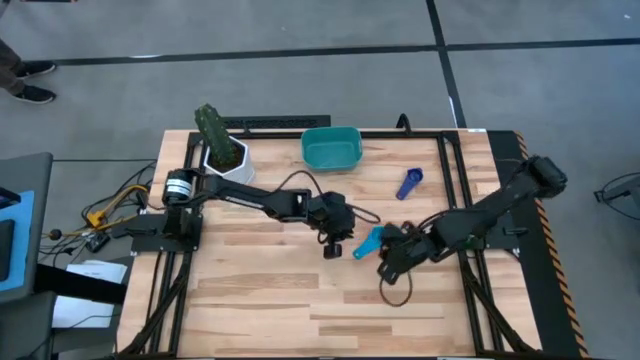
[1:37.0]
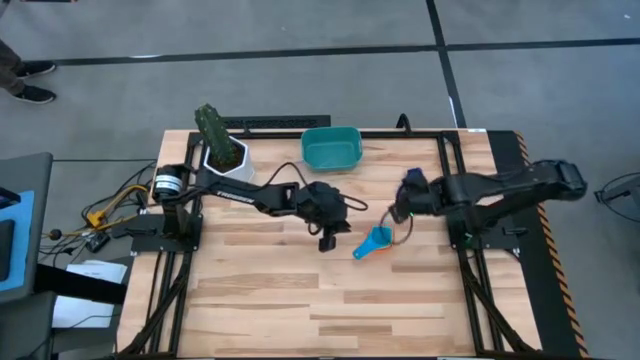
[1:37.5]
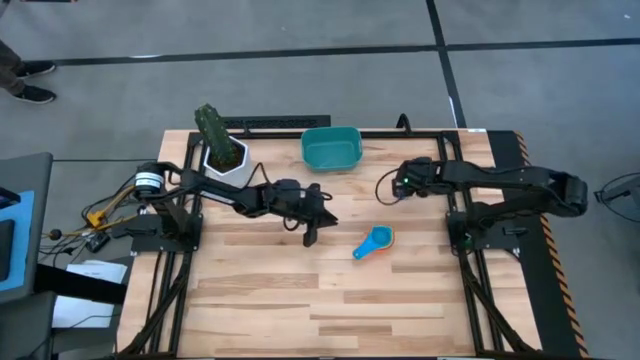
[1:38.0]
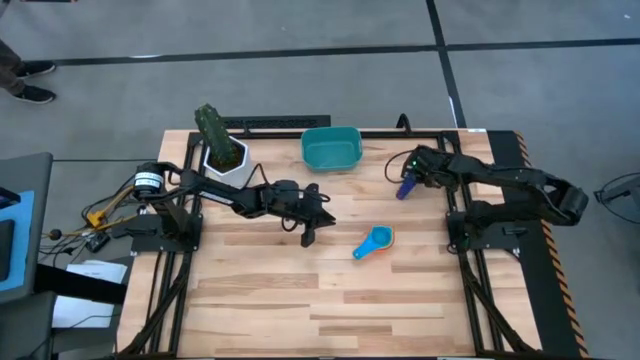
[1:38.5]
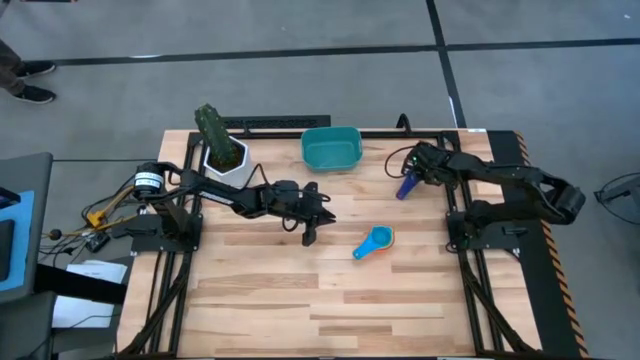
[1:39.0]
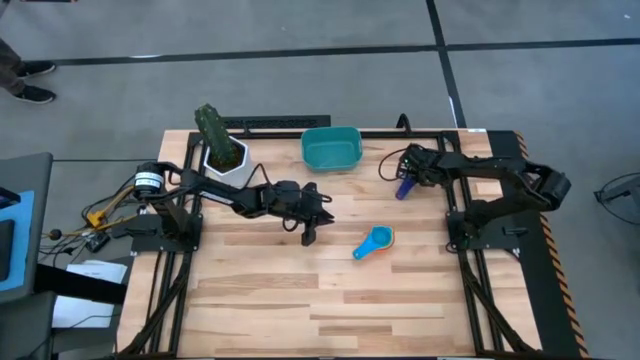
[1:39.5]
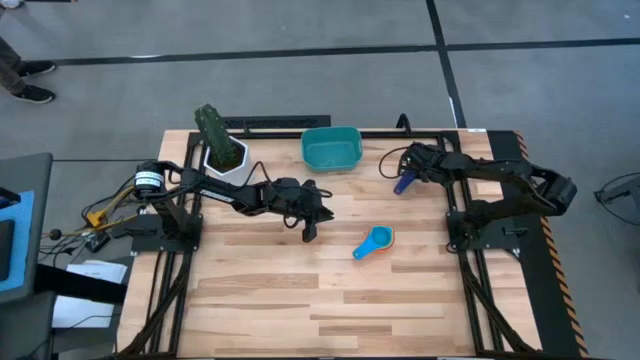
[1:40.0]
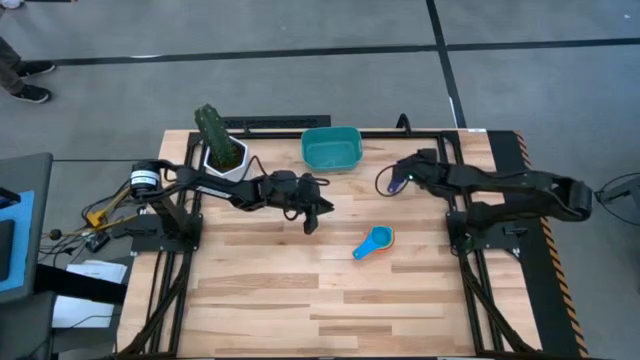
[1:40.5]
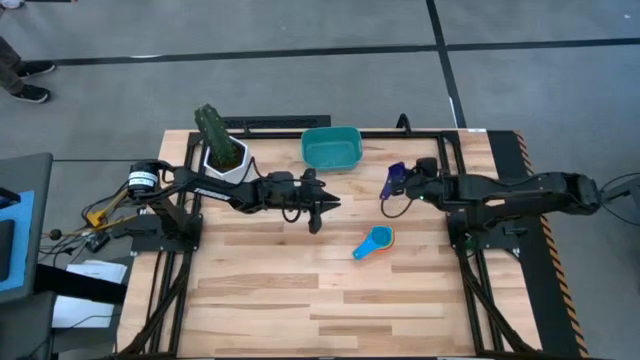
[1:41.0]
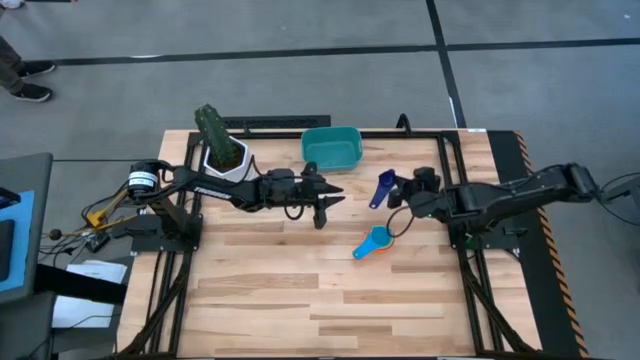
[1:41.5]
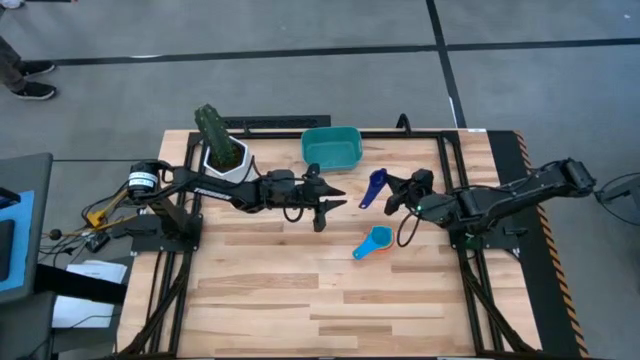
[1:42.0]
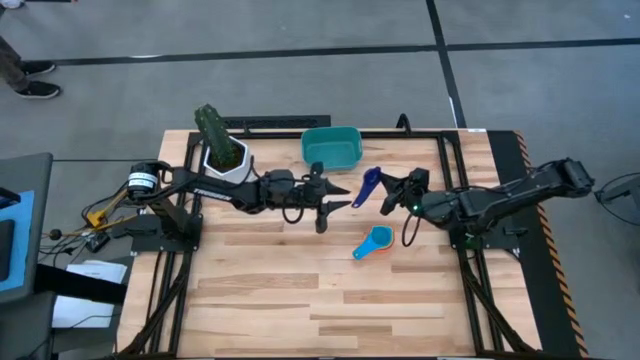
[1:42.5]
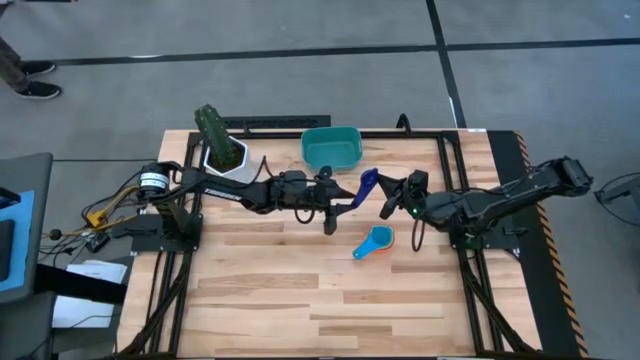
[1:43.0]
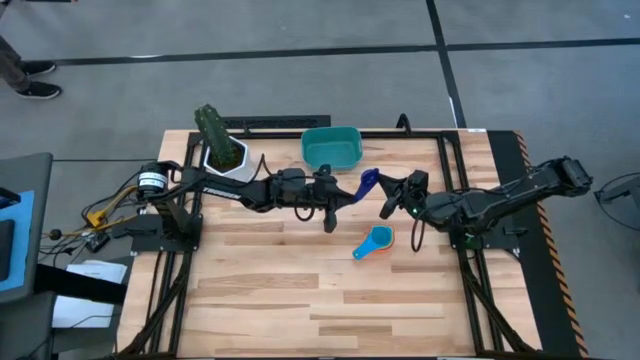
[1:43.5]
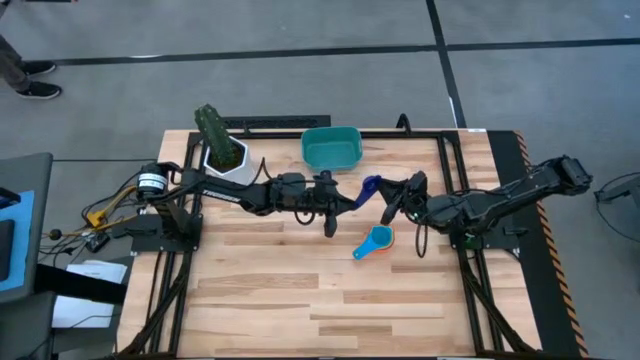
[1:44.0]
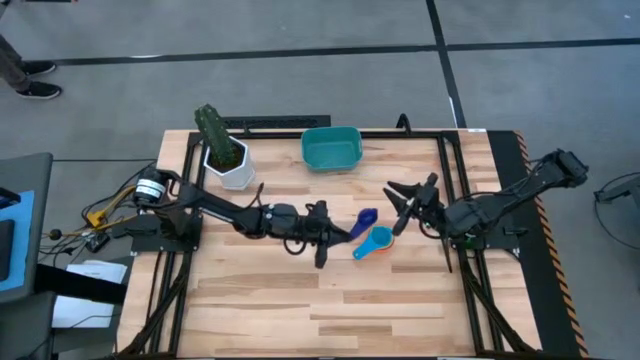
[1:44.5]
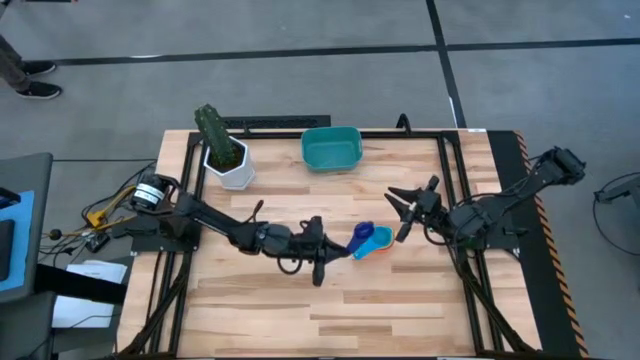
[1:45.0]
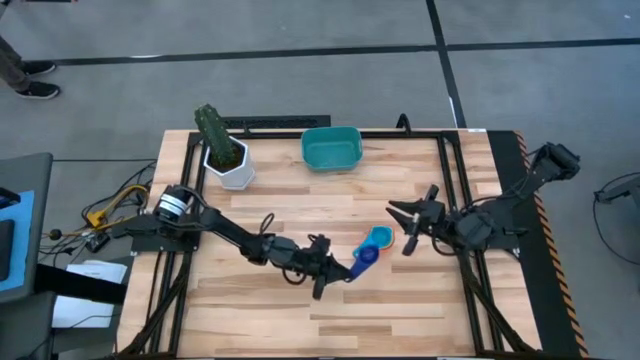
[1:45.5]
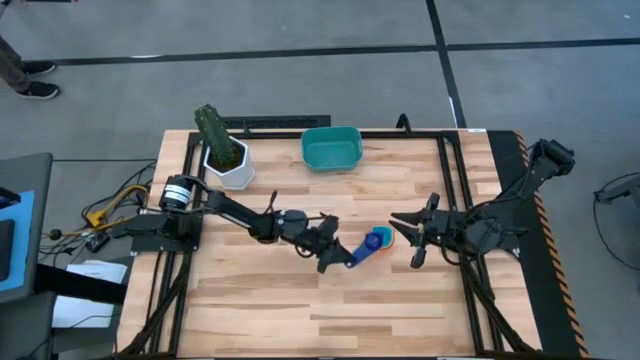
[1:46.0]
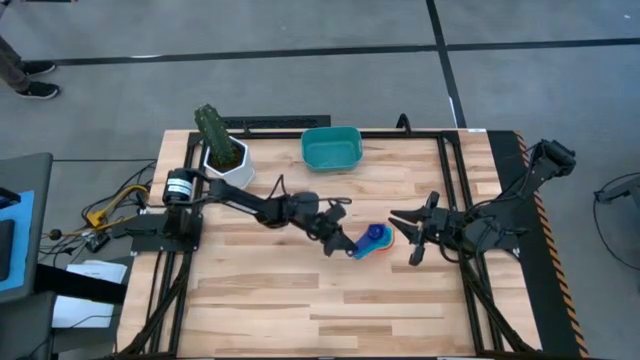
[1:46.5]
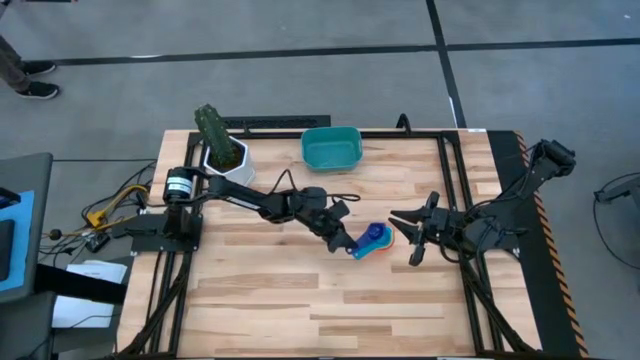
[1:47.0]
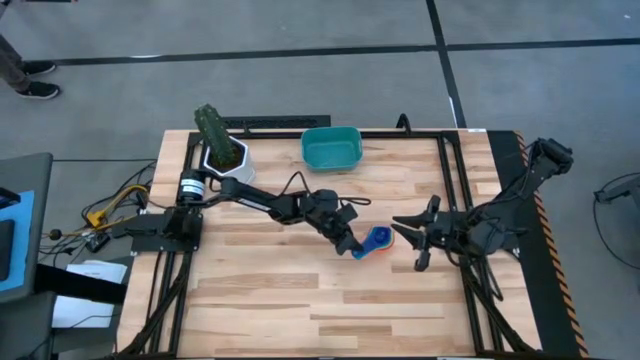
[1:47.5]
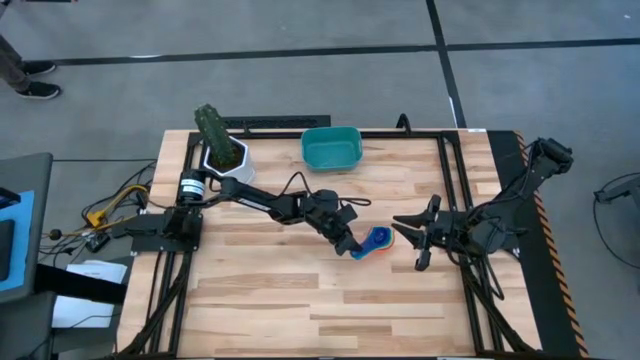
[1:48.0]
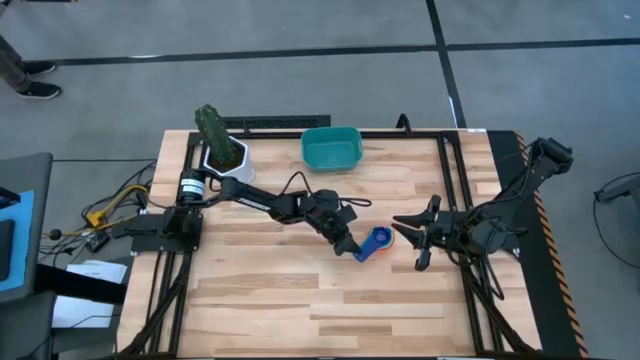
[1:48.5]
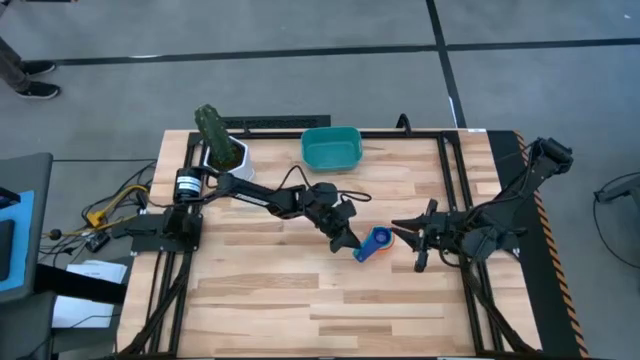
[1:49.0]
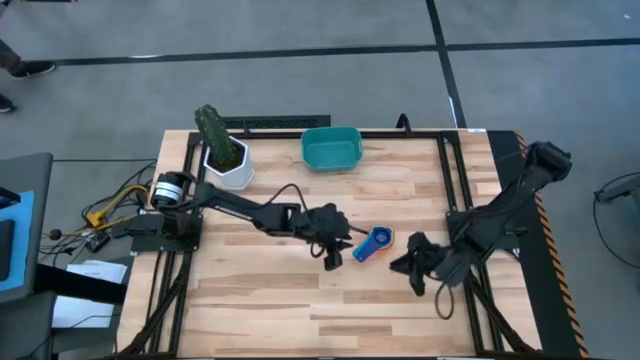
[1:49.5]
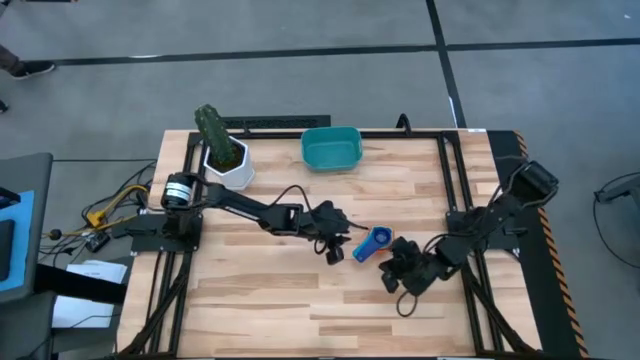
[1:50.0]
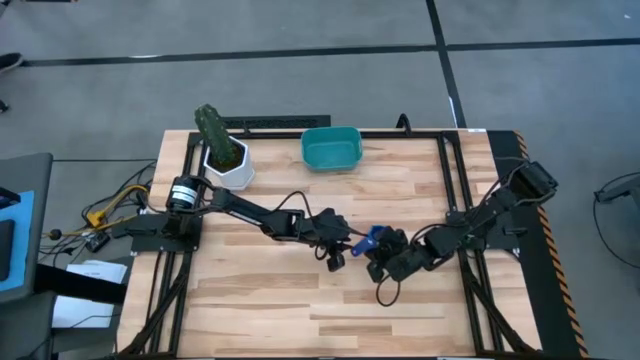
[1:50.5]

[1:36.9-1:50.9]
Task: Nest measuring cups in basket
Stack the dark blue measuring cup into the light blue measuring cup

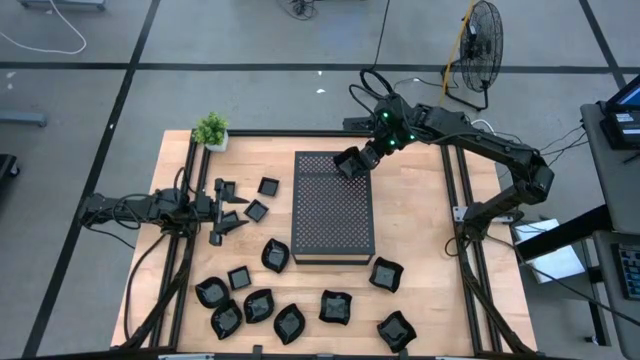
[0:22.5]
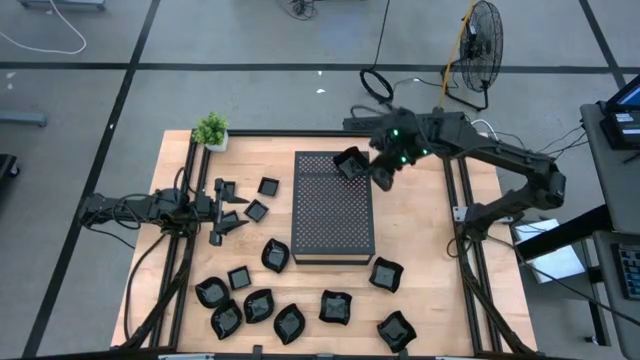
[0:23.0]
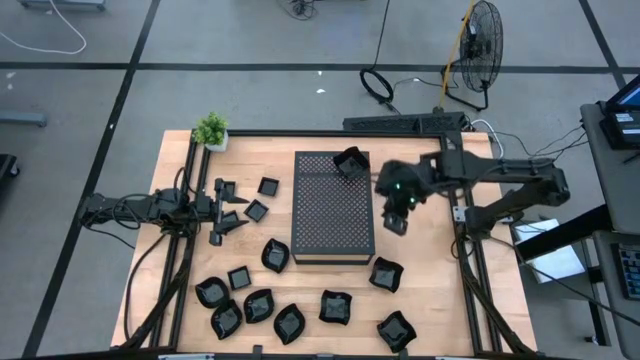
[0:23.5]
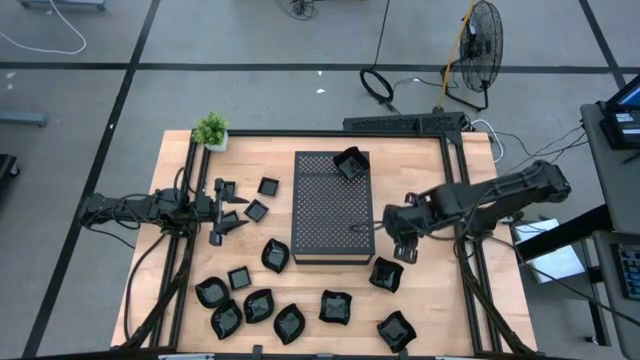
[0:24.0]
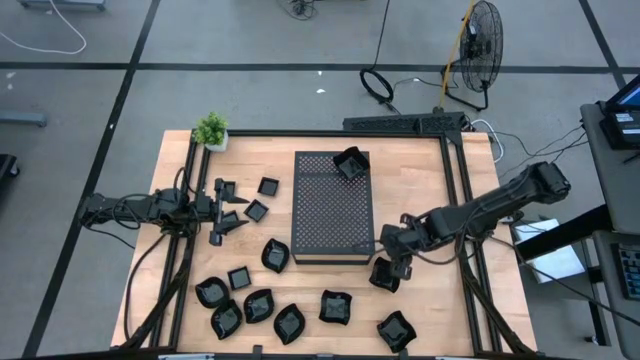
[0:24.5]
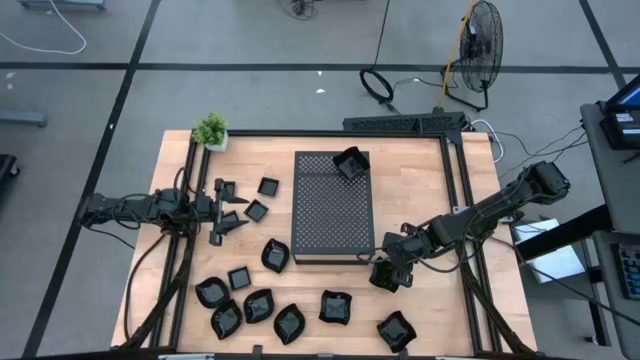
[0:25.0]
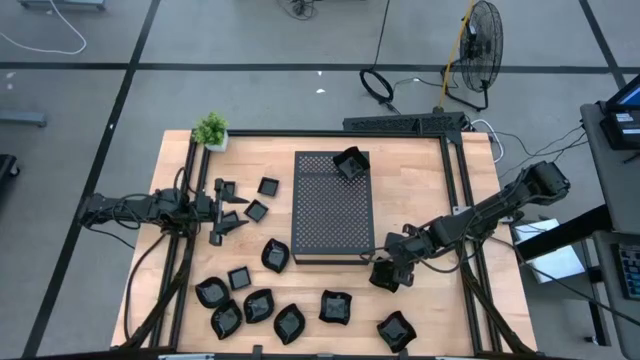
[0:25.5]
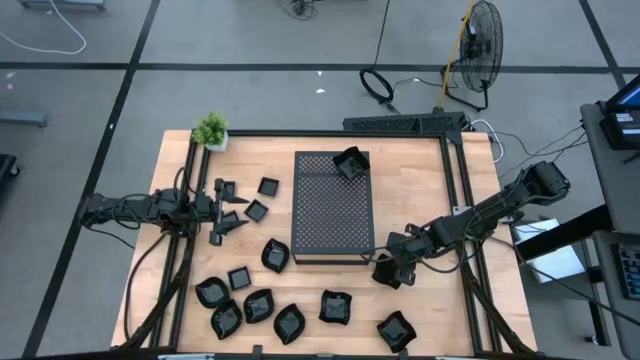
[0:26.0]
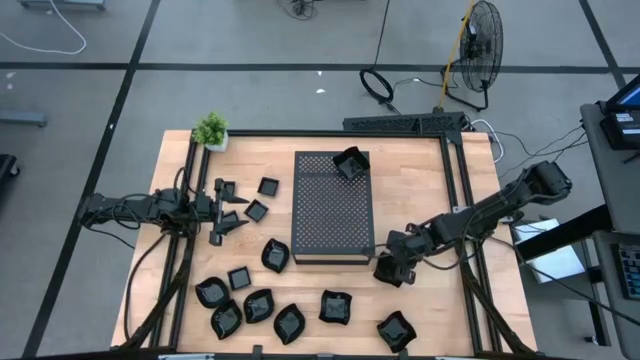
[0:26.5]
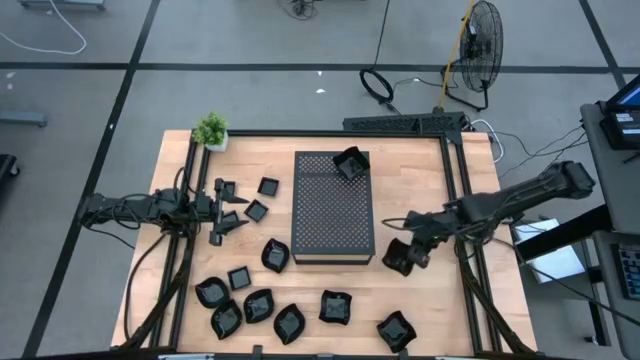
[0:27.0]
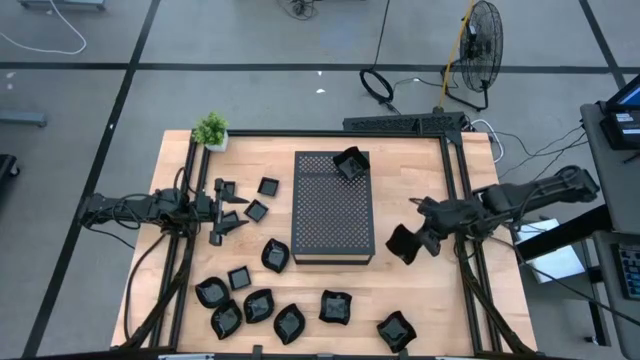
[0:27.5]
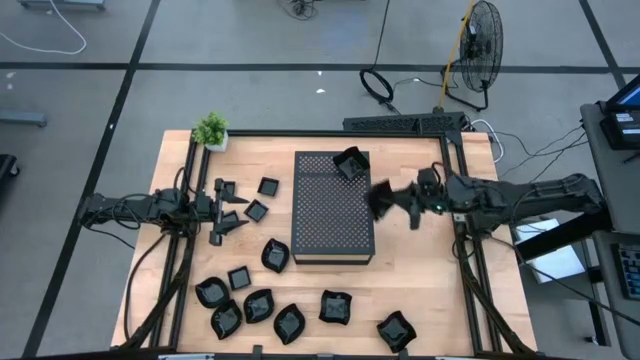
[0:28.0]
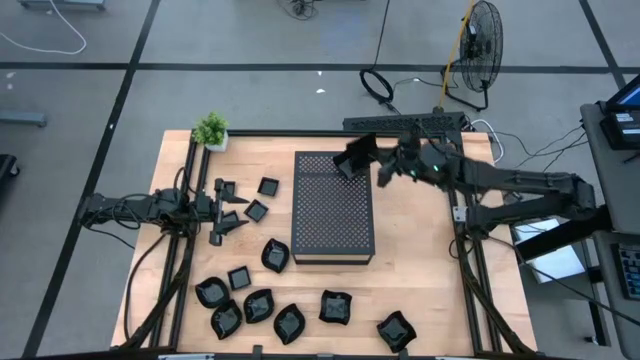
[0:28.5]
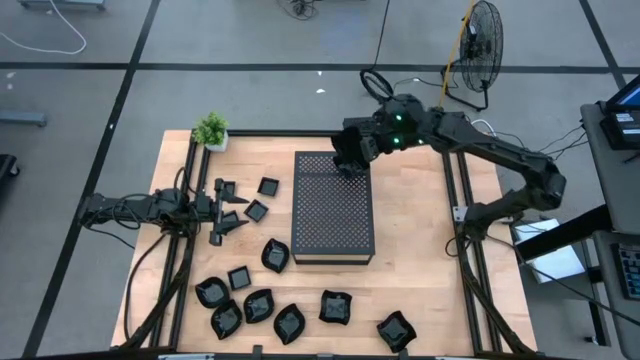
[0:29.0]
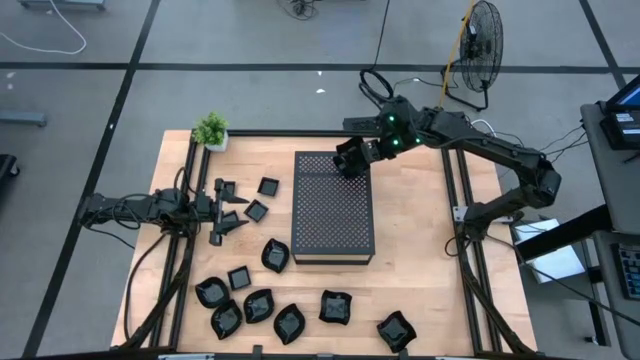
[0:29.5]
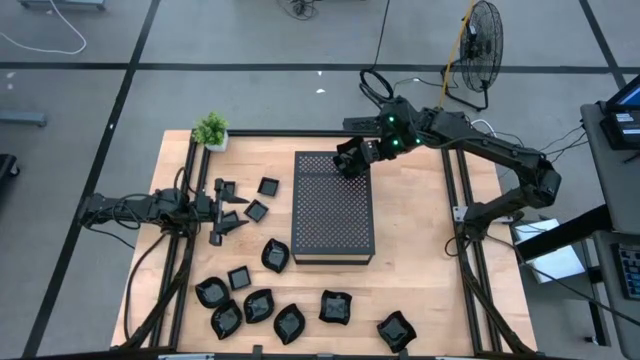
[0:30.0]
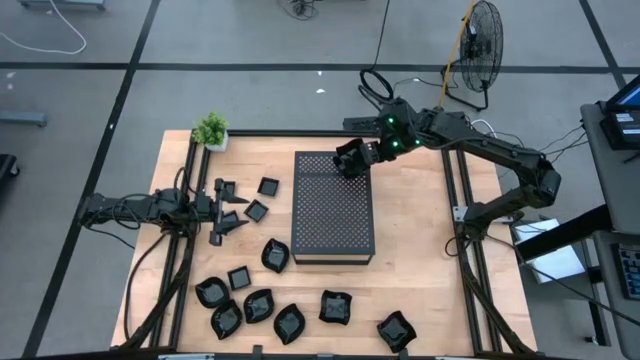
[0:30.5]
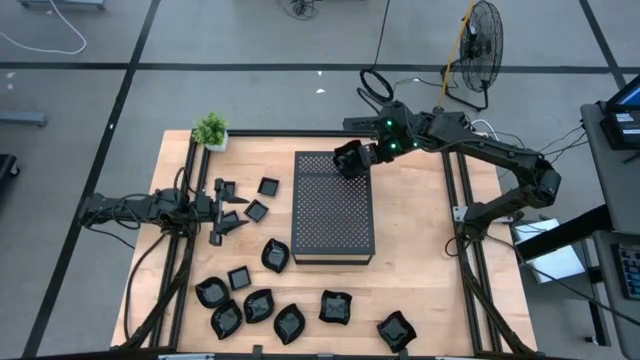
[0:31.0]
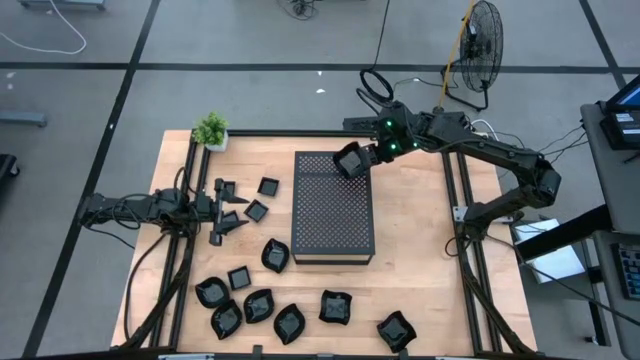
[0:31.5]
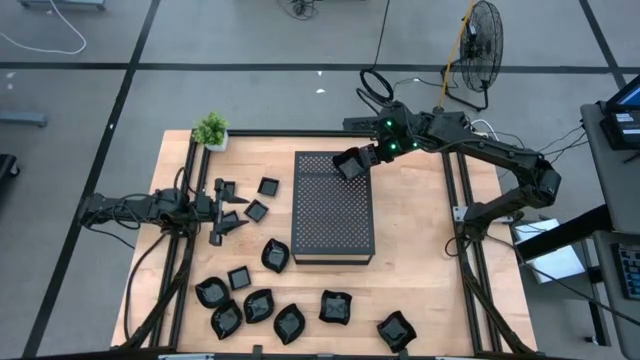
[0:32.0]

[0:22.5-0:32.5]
Task: Pick & Place Mini shaped plates
Stack the black distorted square plate on top of the black distorted square plate on the shelf
